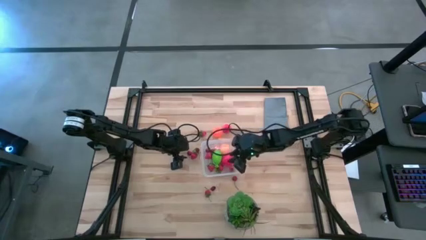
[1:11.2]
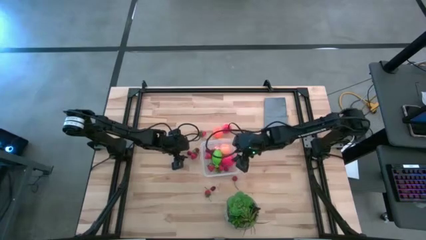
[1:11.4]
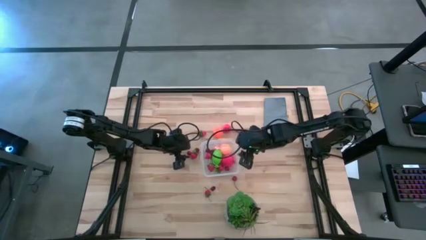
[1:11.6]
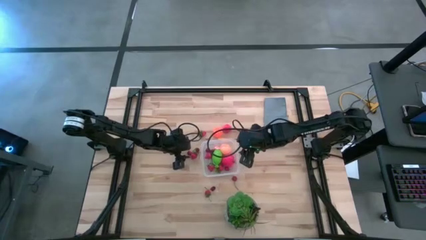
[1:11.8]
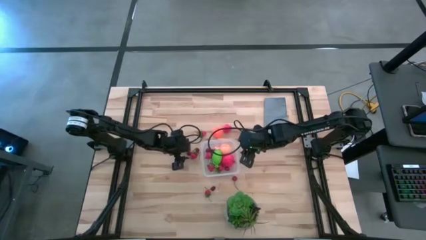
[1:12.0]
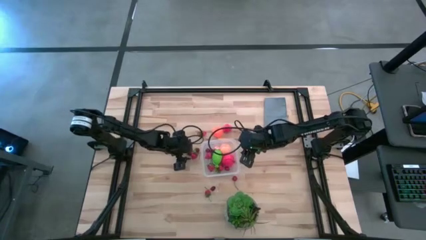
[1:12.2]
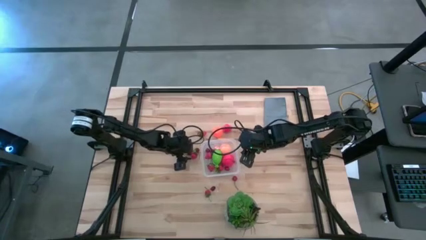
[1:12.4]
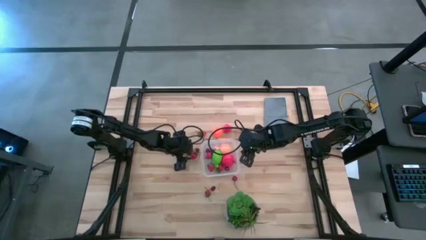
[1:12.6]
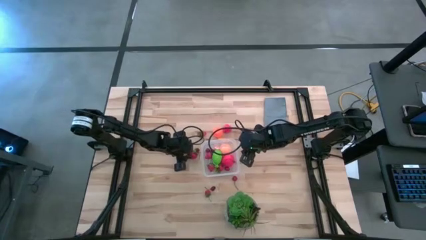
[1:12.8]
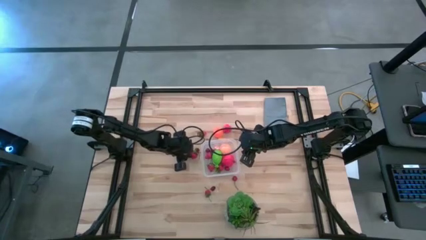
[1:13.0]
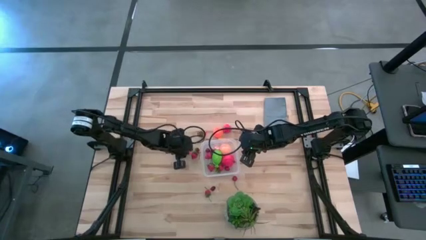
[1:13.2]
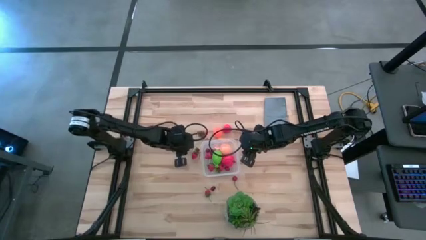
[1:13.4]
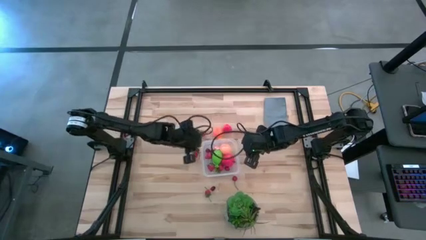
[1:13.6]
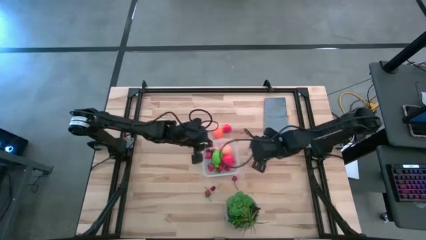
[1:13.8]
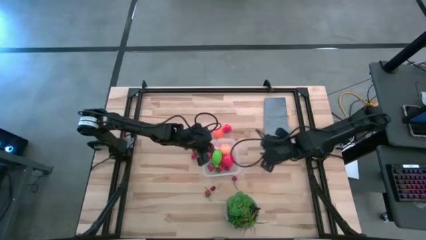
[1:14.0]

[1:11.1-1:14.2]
Task: Pick and placing Produce into tupperware
Put the red cherry into the transparent container

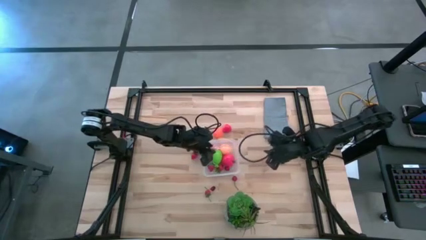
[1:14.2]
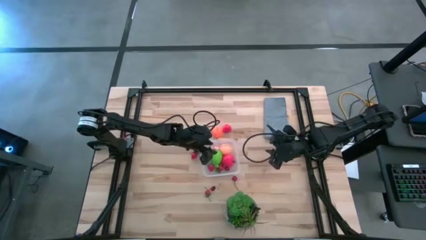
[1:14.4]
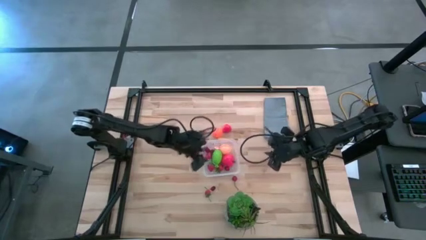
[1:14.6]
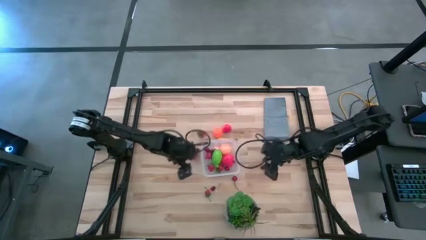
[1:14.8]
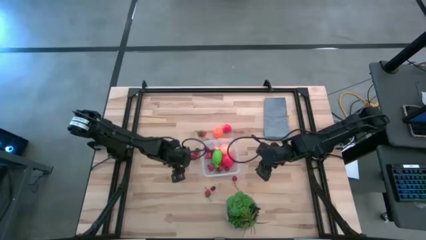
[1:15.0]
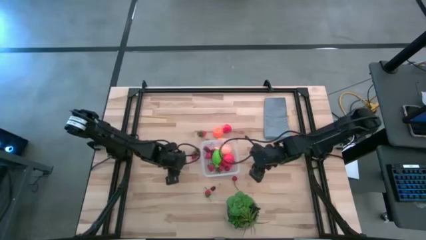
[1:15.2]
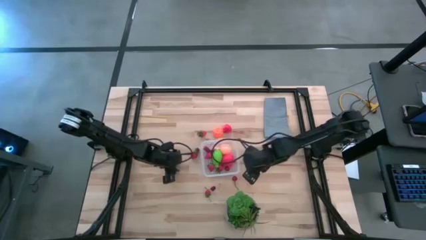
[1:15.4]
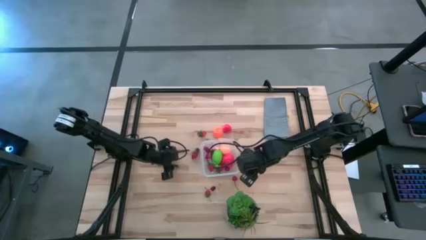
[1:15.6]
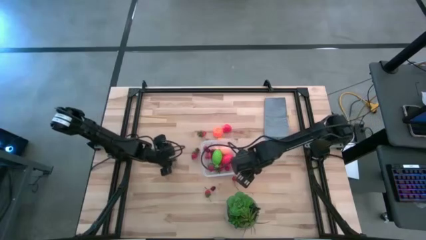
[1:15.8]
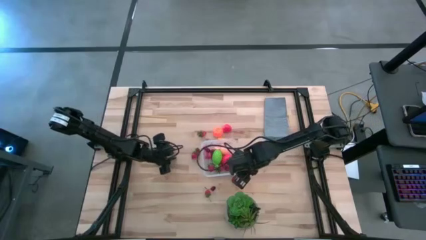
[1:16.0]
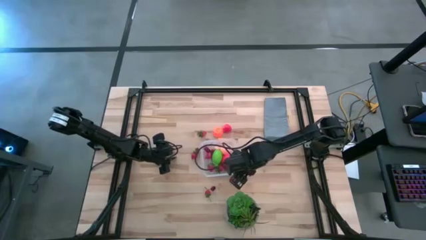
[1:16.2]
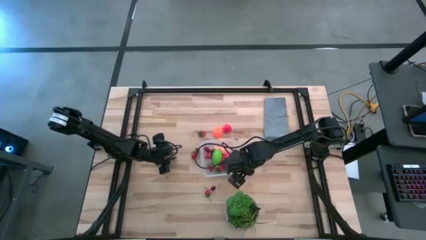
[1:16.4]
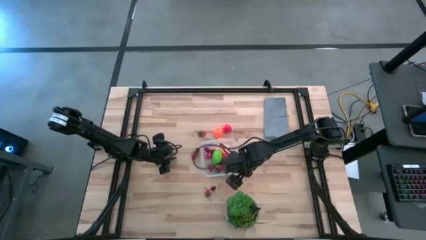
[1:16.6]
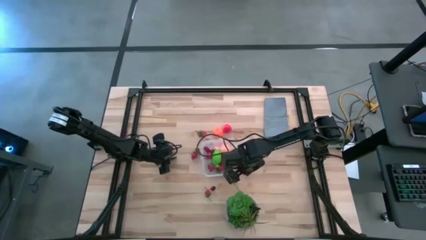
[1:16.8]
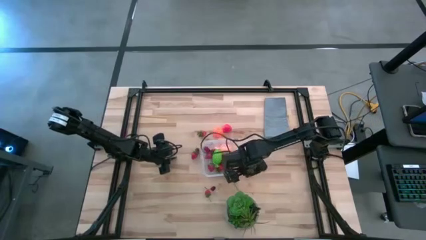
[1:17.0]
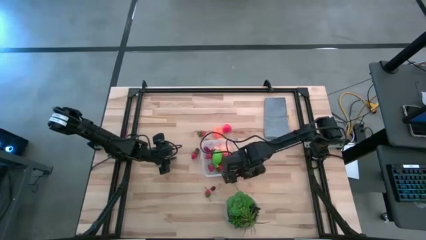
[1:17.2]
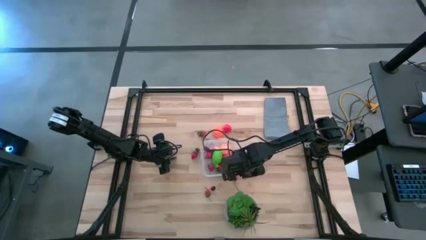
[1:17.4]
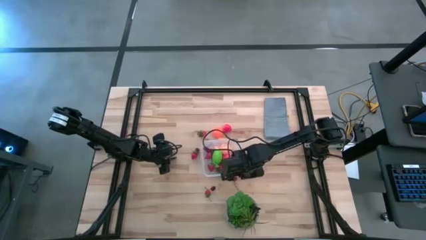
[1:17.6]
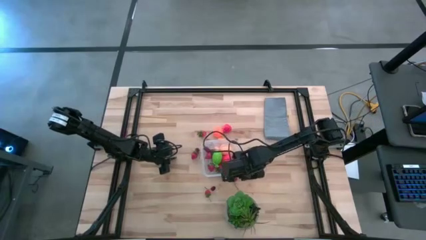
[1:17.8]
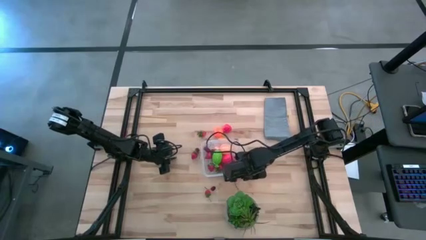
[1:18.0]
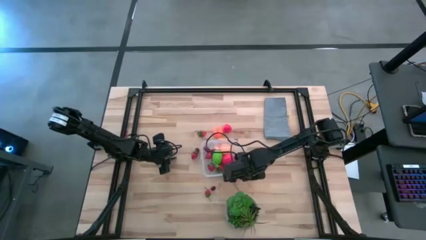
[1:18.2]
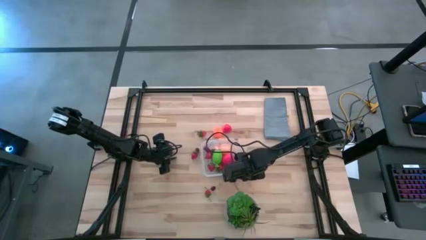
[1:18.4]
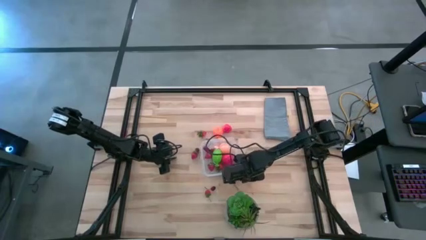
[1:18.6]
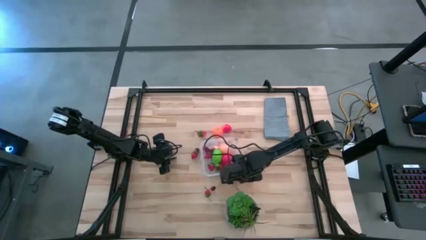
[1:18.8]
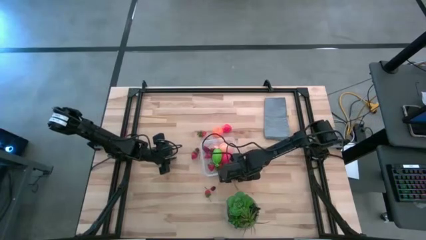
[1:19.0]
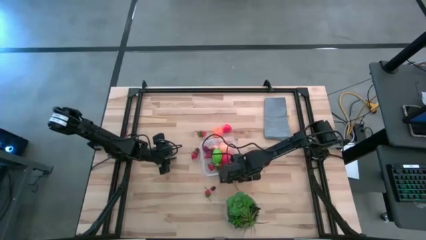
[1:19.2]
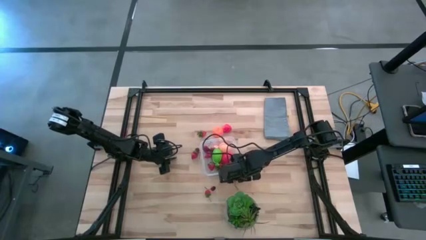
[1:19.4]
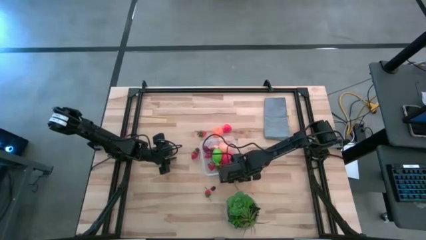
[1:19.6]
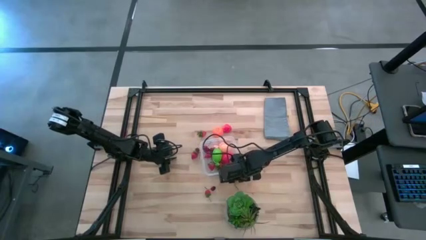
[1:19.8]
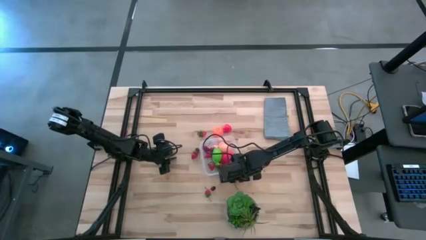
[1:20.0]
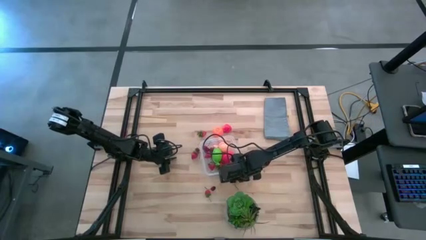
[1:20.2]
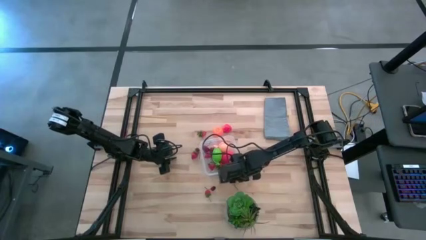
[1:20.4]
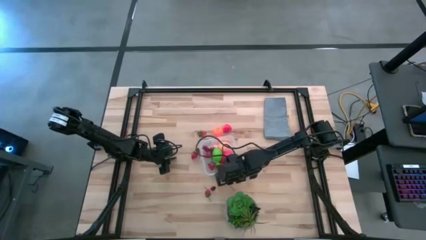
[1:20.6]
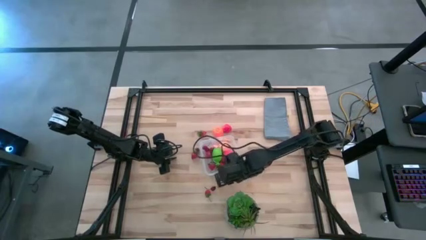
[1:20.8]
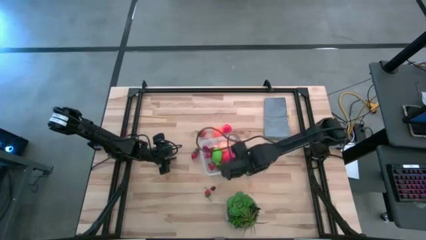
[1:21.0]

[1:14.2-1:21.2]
Put the red cherry into the transparent container

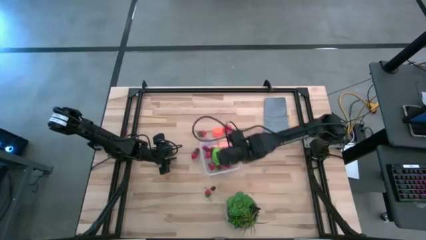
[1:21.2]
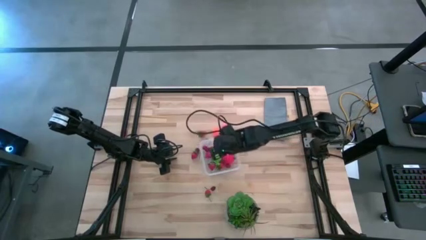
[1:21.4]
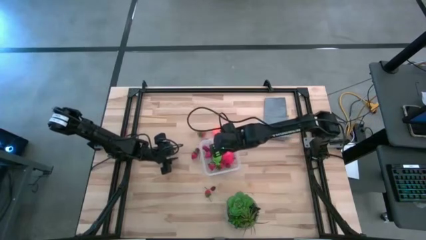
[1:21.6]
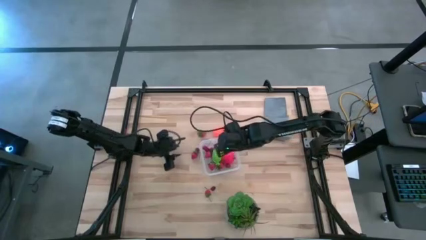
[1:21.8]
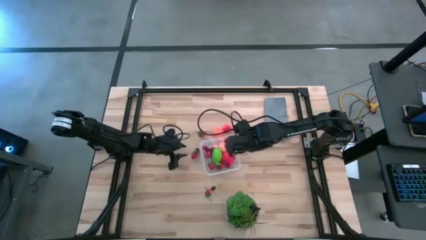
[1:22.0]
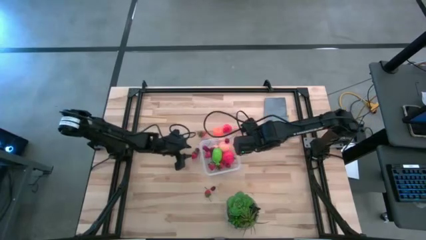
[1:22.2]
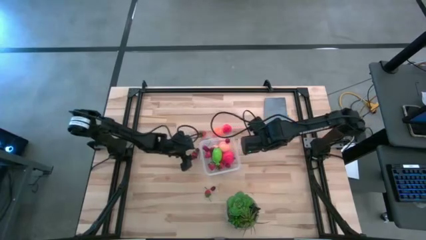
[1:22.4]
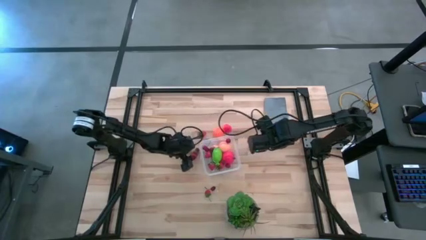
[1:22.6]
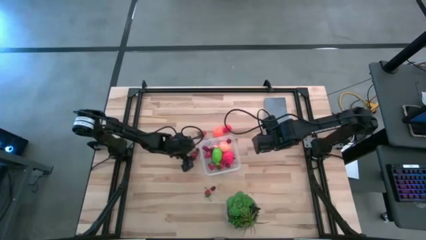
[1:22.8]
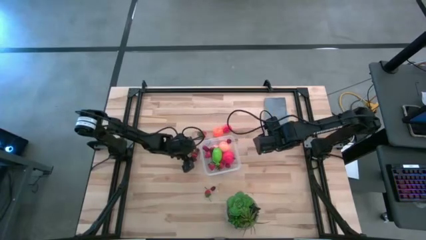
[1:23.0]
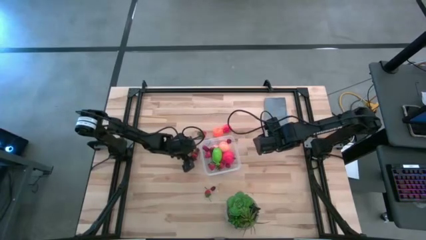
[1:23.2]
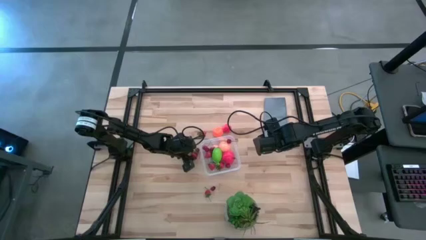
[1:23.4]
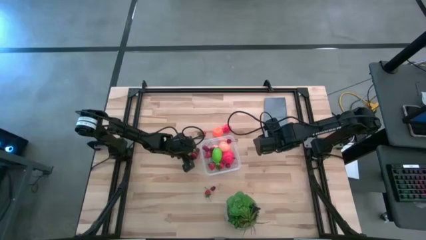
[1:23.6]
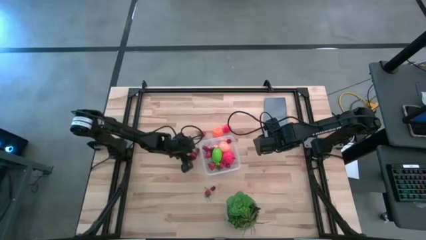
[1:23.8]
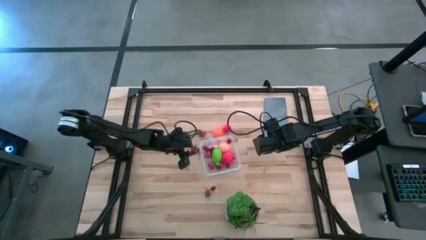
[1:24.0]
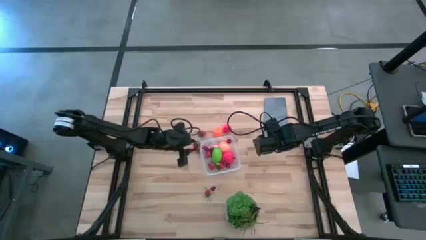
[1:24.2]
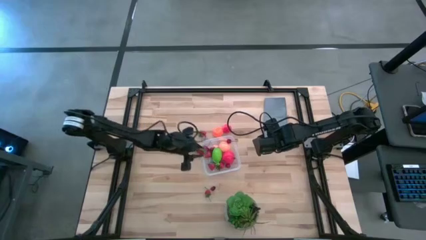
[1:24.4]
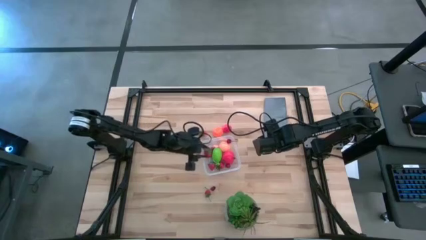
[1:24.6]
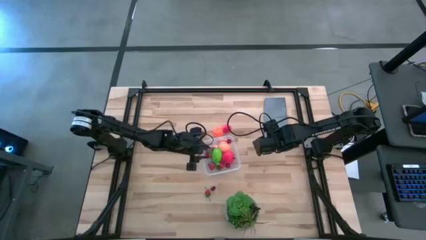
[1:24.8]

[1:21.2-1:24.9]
Put the red strawberry into the transparent container
